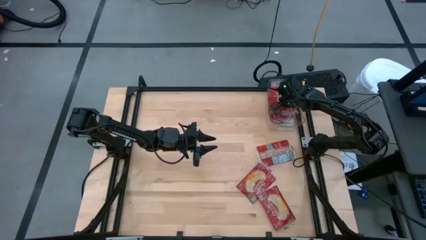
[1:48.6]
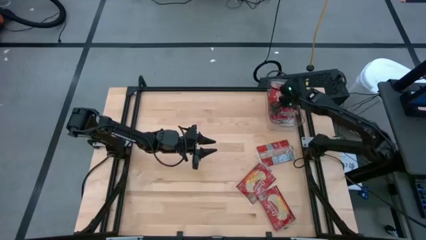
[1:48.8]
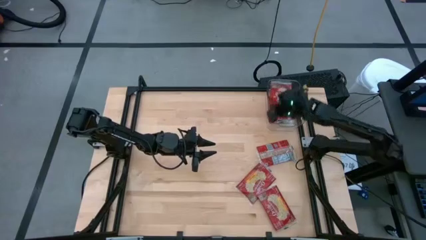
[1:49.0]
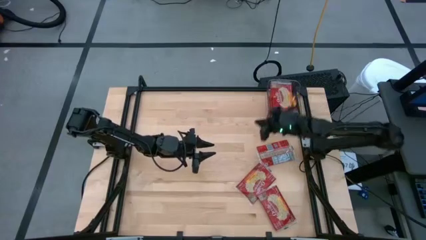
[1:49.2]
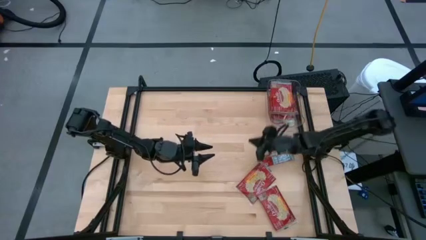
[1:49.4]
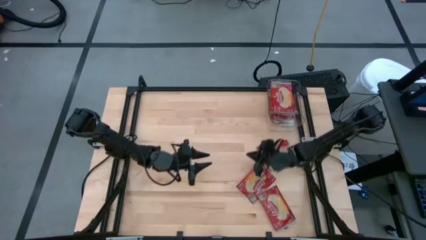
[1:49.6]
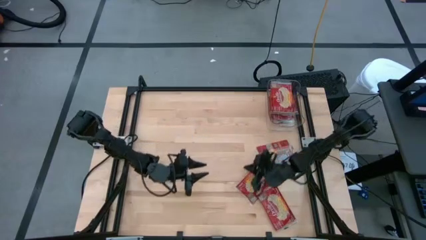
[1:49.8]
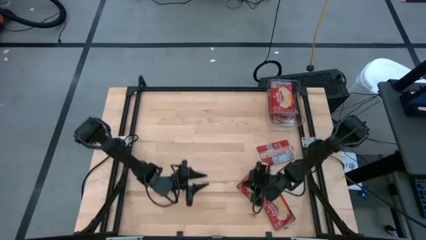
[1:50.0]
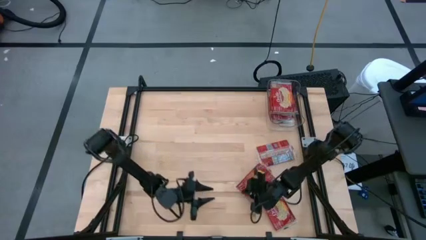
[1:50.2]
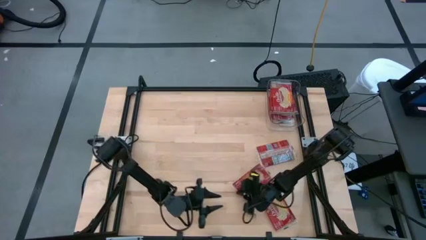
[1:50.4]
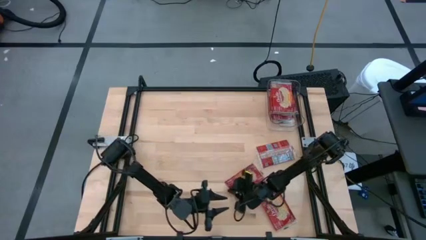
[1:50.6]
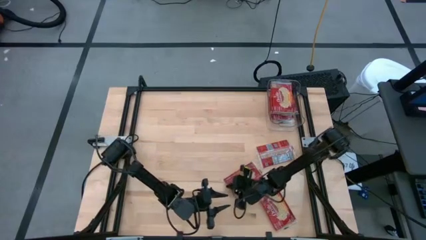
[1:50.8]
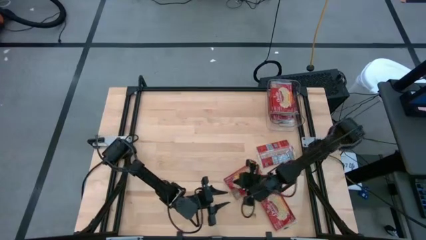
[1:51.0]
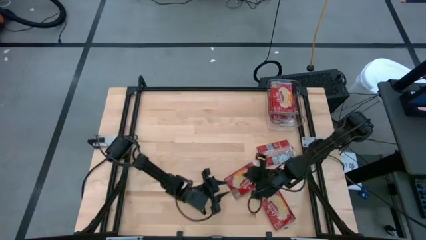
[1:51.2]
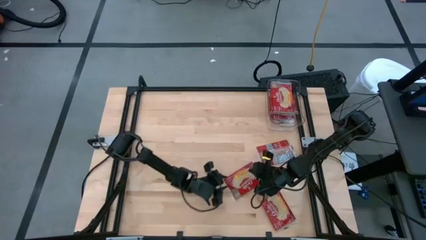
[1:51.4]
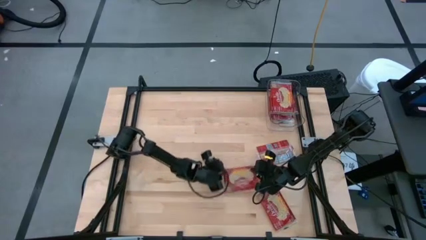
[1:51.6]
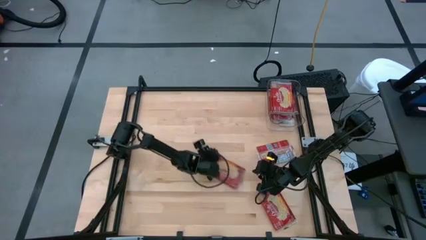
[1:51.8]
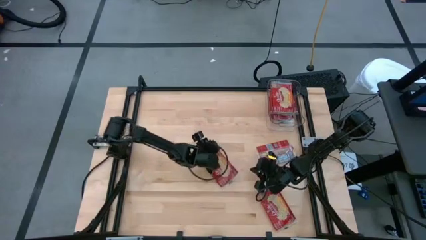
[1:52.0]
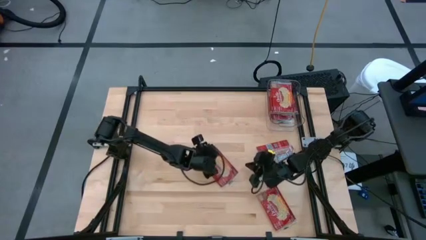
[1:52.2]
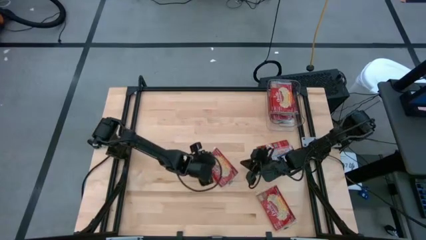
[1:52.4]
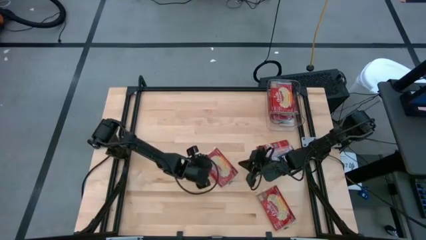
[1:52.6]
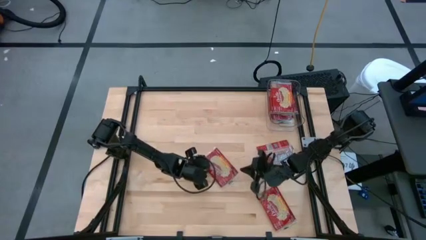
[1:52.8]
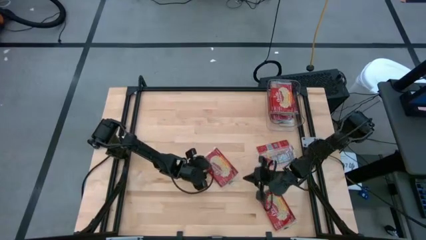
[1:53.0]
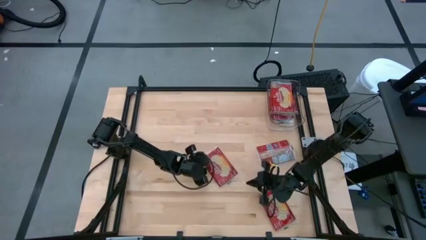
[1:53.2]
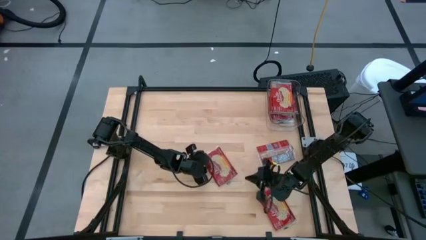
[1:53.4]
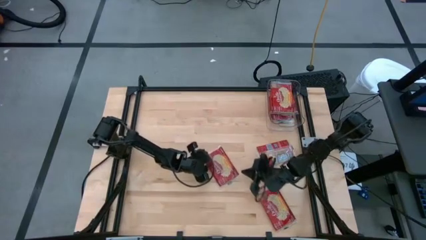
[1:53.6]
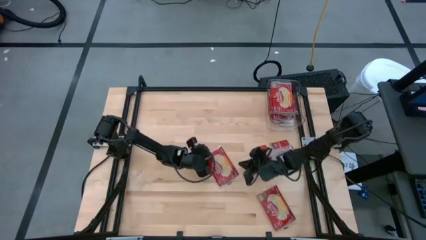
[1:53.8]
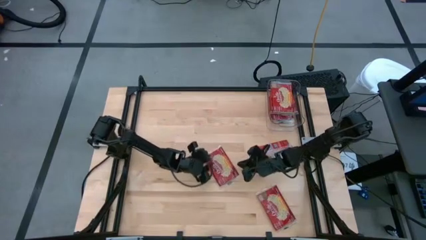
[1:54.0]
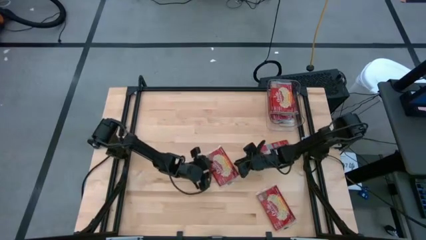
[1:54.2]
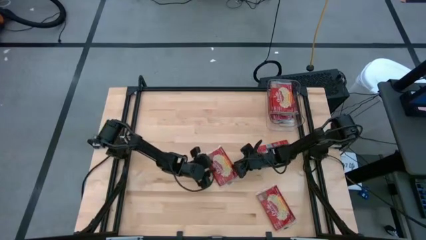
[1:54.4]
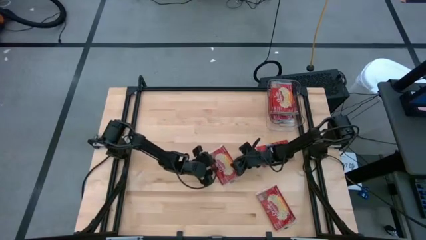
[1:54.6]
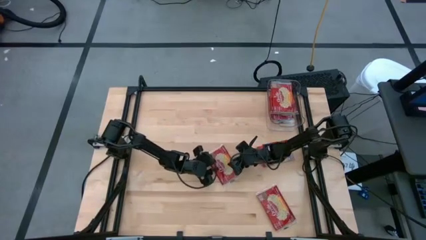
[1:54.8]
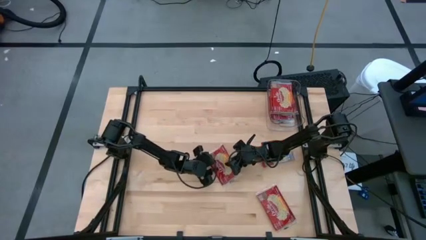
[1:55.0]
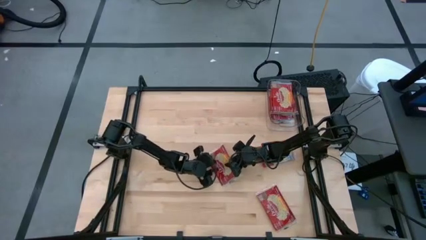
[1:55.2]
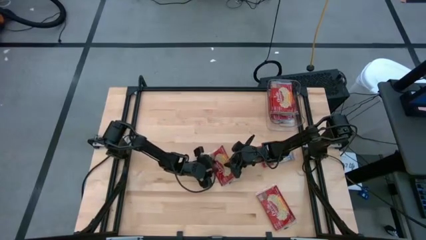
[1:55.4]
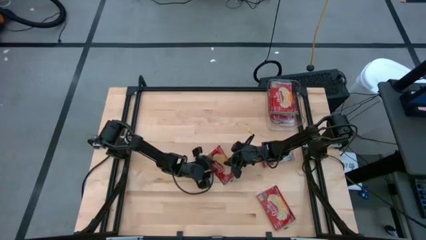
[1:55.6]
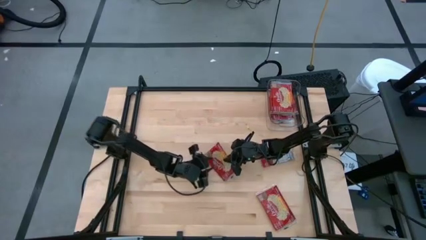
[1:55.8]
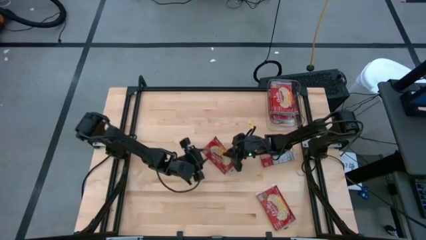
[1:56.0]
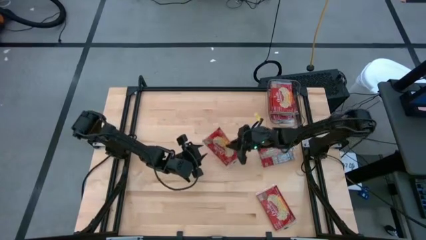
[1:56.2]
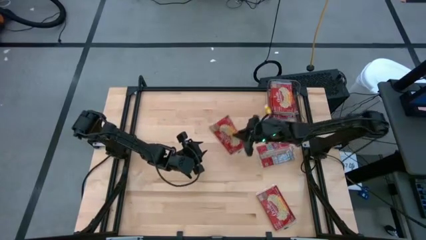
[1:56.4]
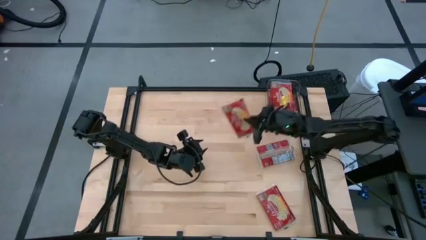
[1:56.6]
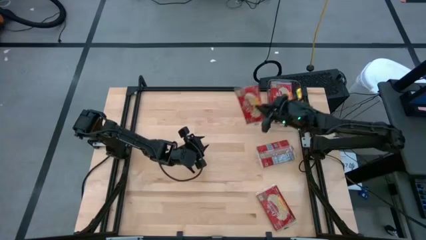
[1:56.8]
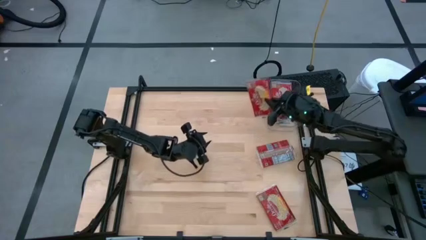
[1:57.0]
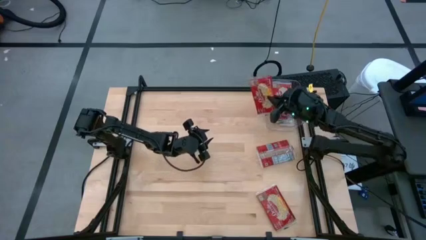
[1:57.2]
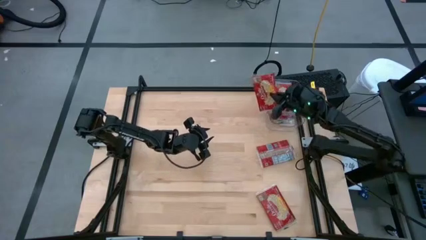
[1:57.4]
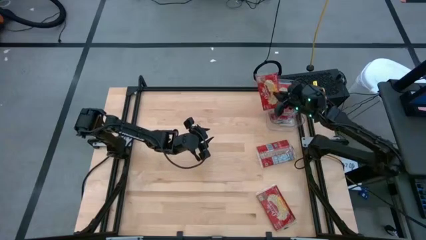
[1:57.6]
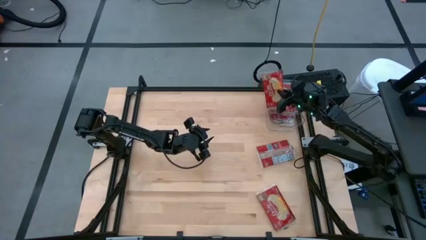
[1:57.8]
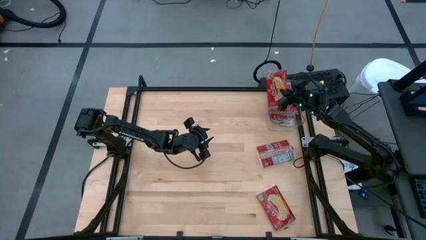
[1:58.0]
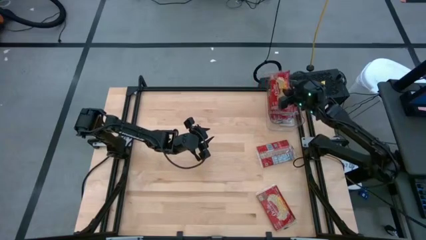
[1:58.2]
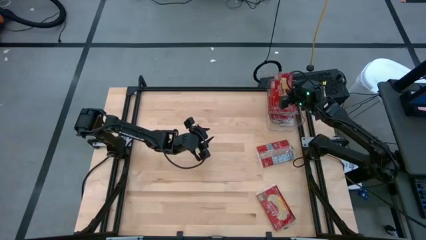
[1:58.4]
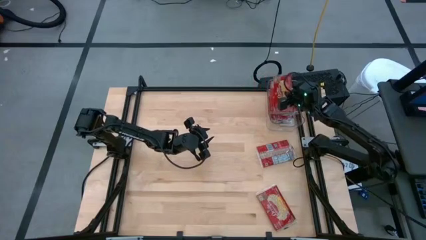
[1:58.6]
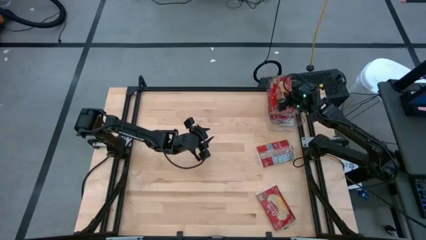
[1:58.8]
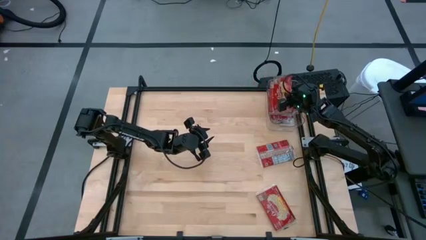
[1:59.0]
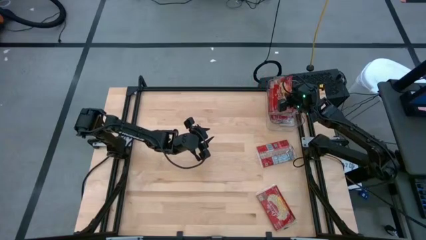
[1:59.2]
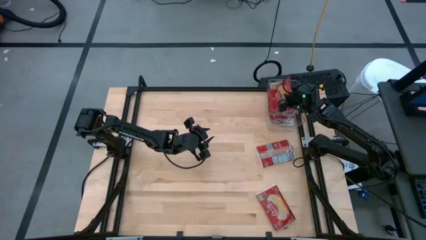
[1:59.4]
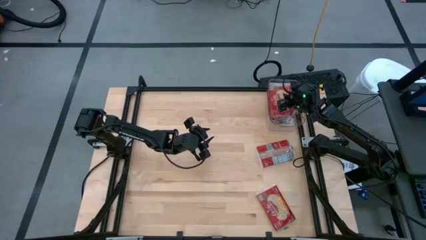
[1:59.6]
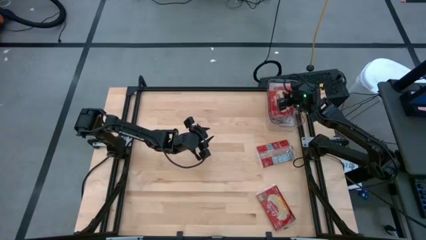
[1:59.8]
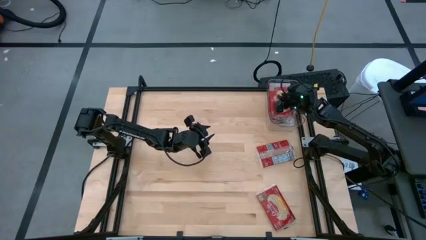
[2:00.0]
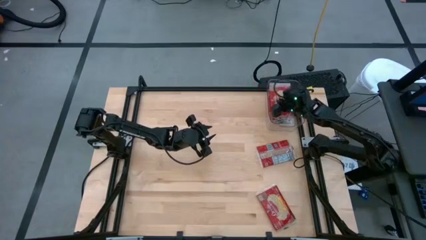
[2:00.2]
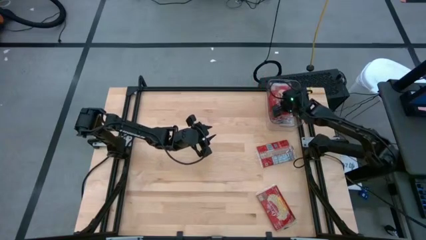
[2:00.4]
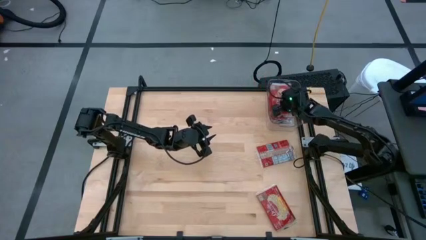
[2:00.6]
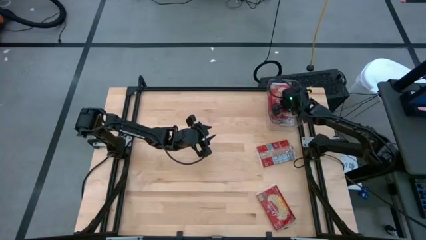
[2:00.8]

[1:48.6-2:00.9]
Task: Sort popcorn bags into baskets
Put the red popcorn bag into the transparent bin

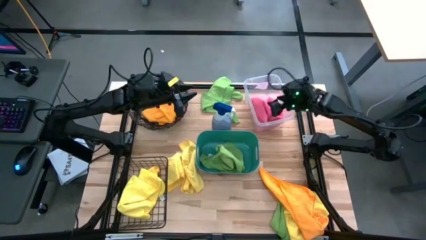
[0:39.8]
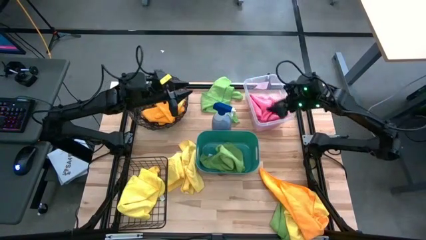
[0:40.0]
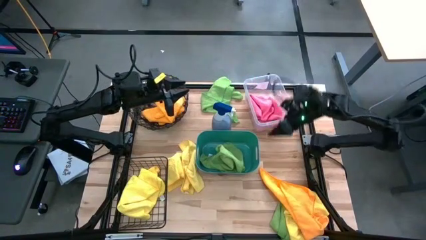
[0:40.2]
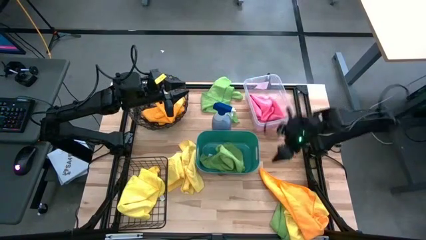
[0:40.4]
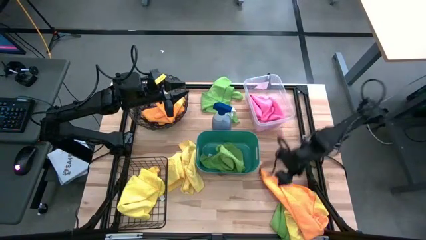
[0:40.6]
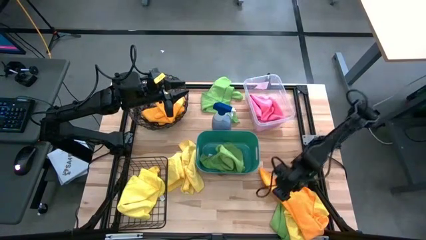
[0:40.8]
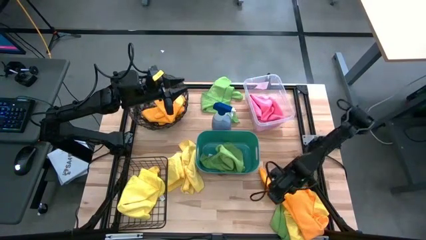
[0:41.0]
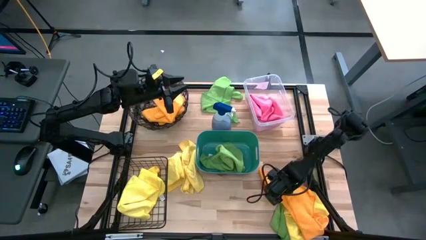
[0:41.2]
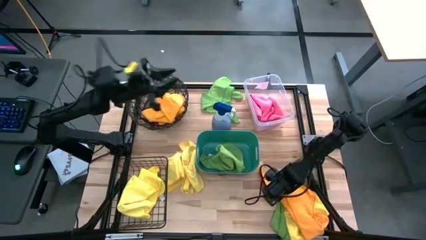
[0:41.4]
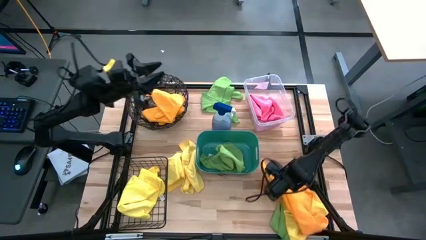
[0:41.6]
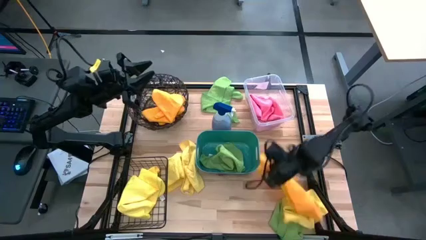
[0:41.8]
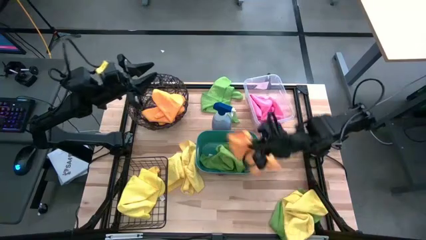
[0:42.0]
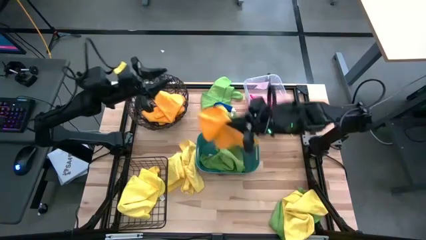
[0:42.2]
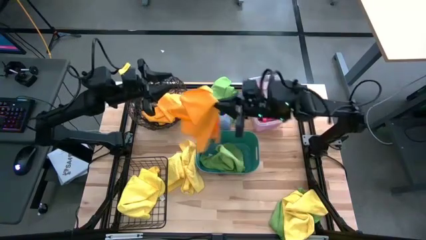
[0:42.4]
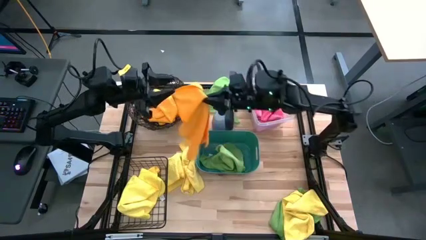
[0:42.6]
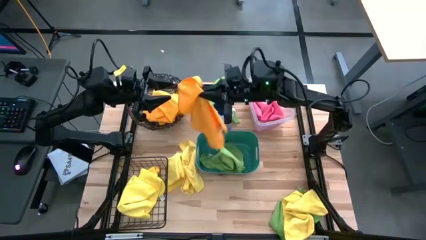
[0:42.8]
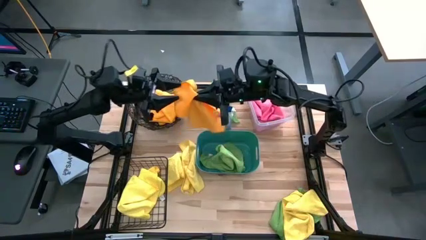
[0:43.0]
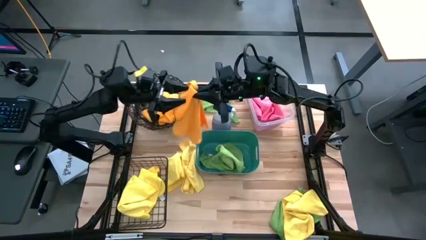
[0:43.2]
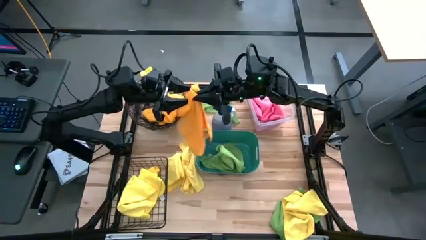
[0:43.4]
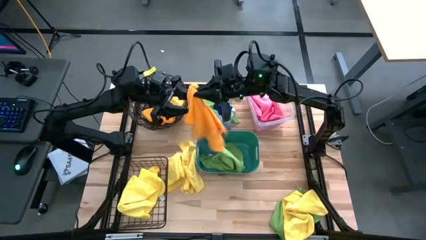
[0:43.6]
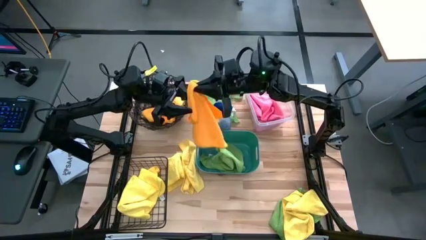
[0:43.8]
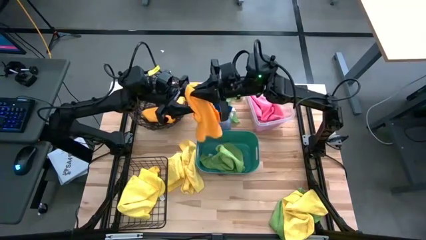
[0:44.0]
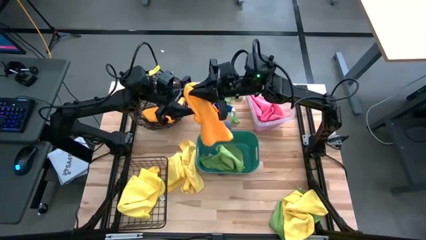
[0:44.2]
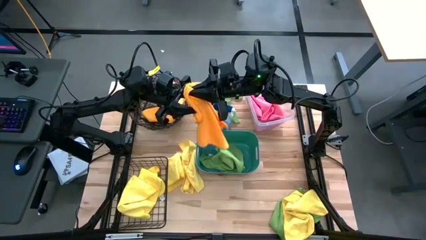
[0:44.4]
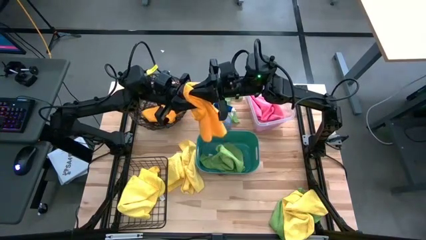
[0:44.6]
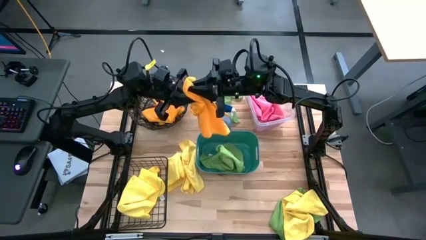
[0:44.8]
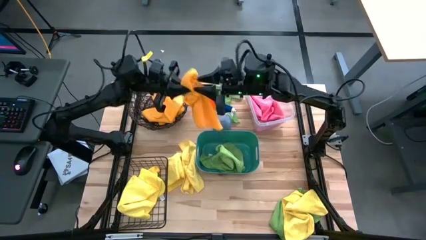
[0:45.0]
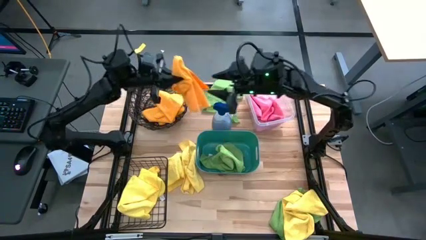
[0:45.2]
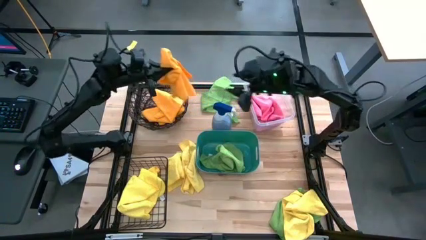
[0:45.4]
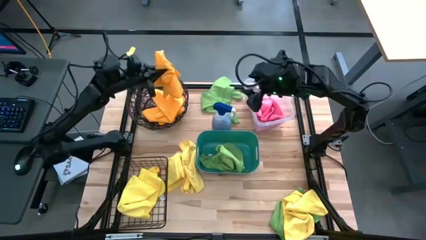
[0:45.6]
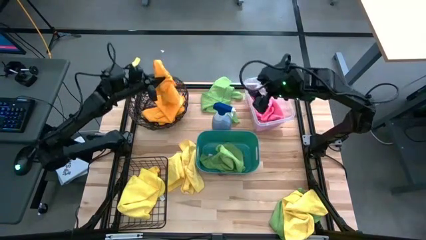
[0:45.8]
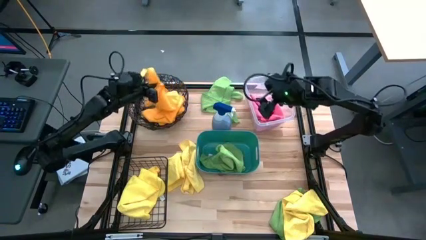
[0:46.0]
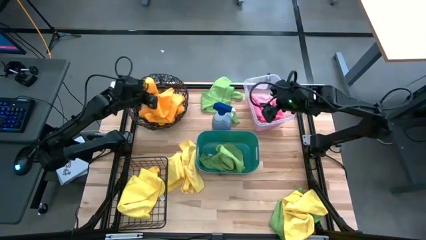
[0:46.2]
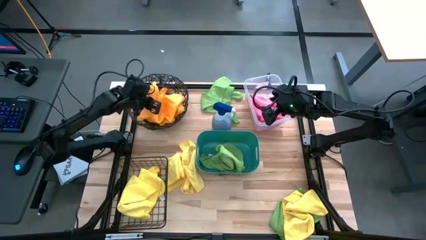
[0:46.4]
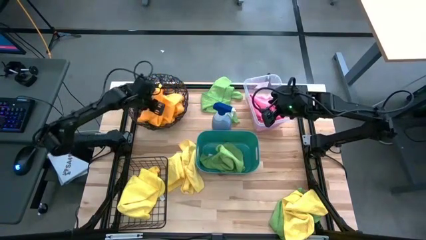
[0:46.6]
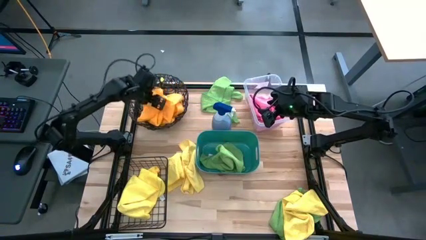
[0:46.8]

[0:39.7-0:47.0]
Task: Sort microfiber towel by color & place in baskets
Put the orange towel into the circular wire basket
